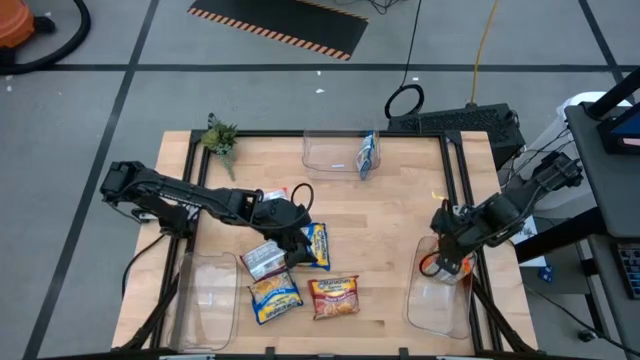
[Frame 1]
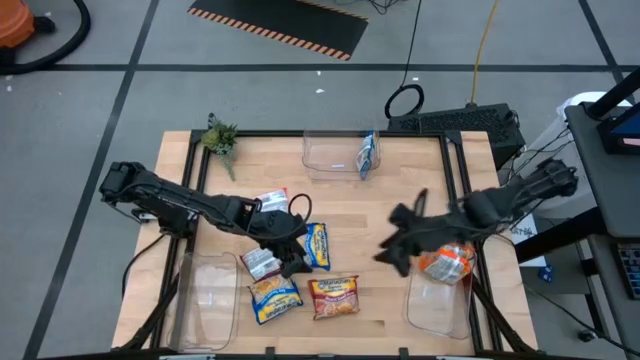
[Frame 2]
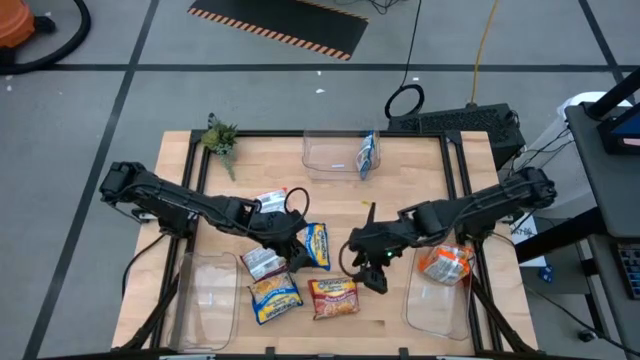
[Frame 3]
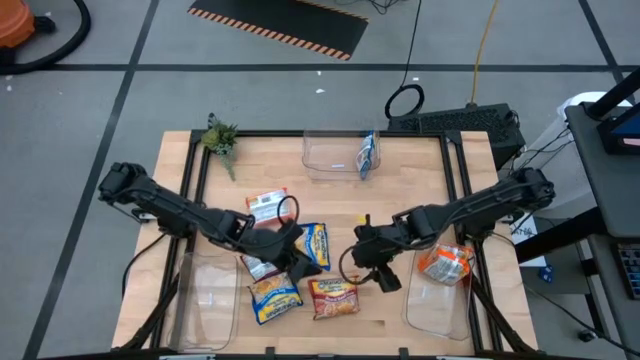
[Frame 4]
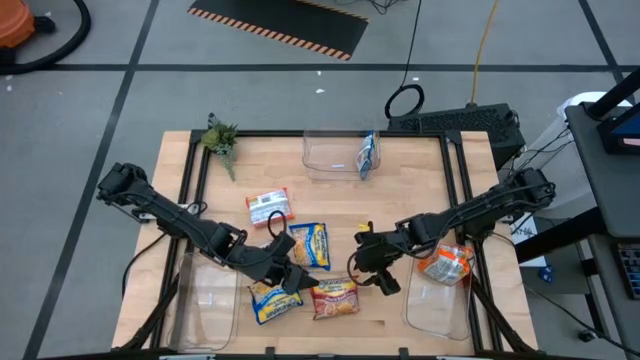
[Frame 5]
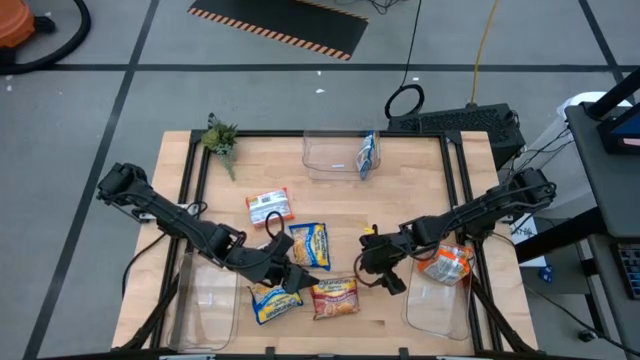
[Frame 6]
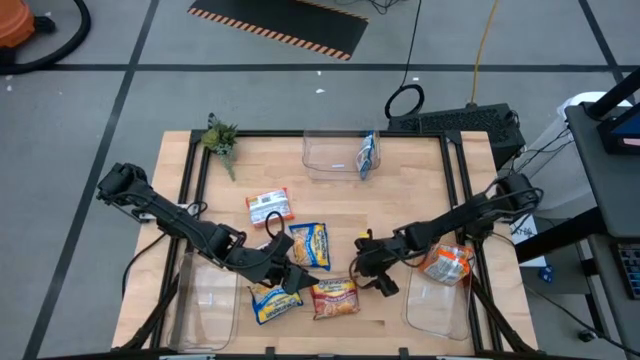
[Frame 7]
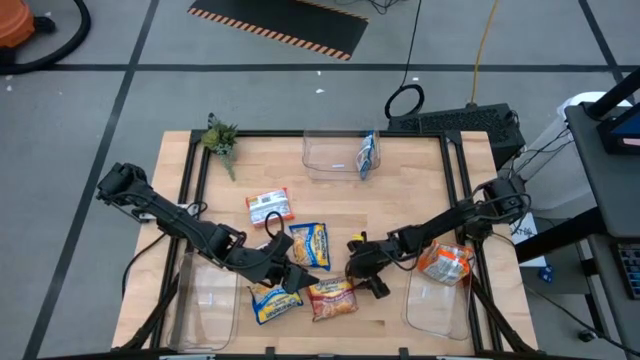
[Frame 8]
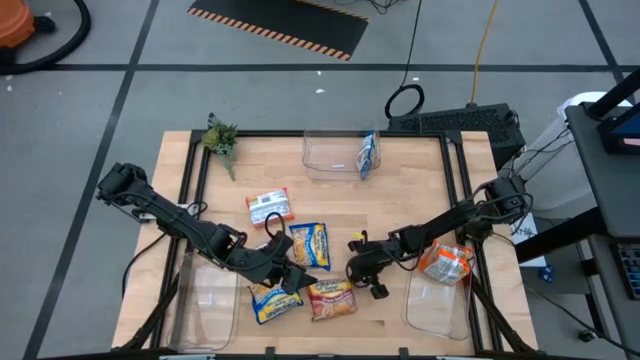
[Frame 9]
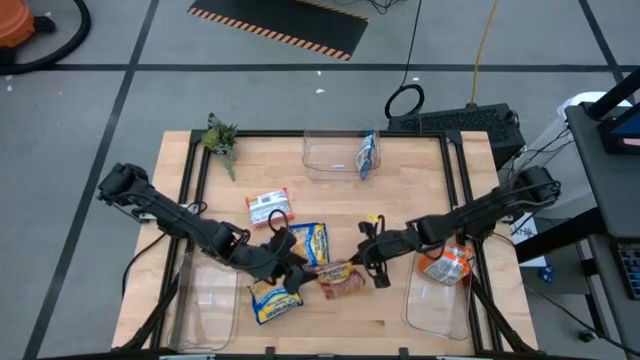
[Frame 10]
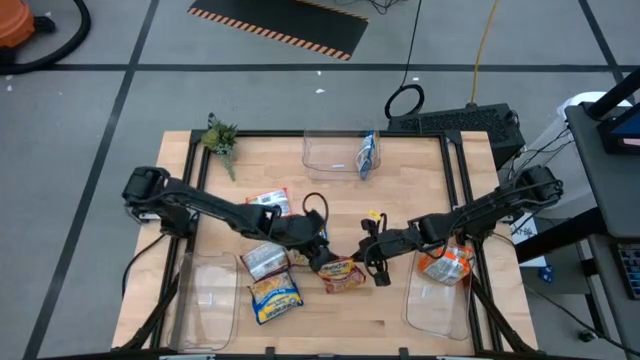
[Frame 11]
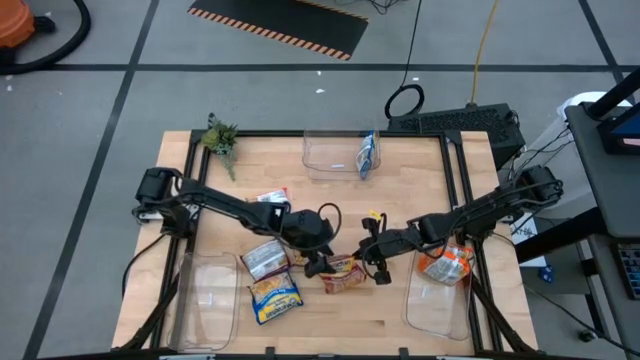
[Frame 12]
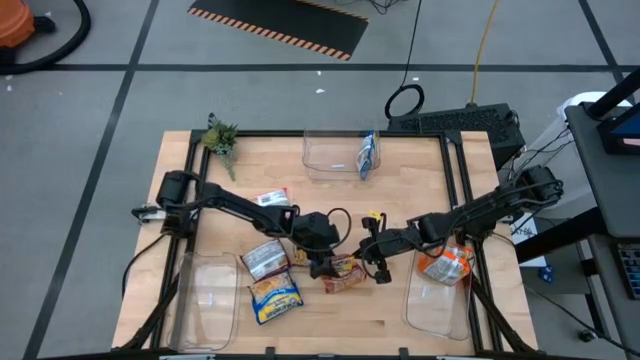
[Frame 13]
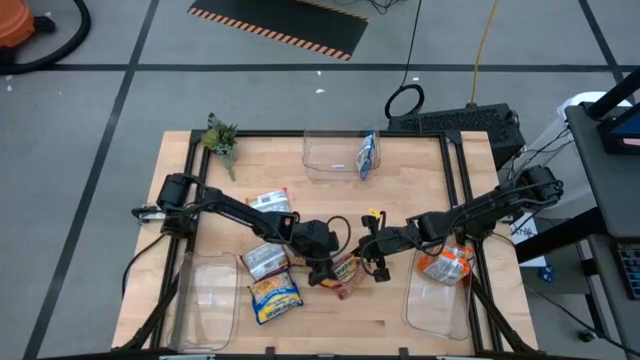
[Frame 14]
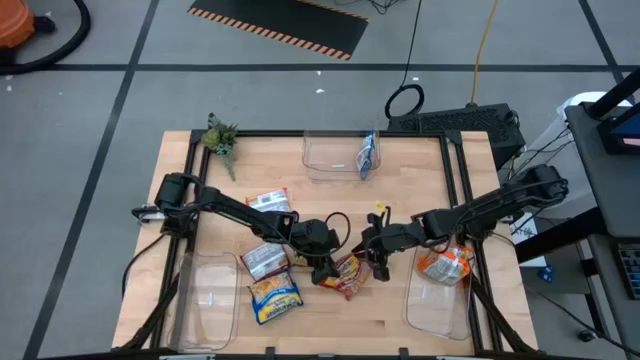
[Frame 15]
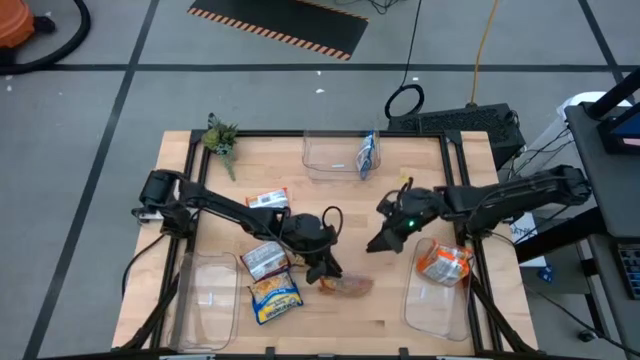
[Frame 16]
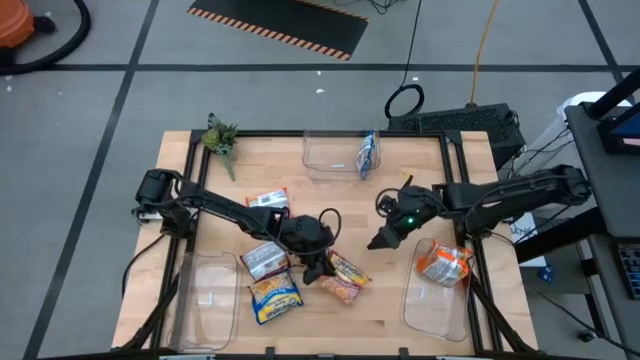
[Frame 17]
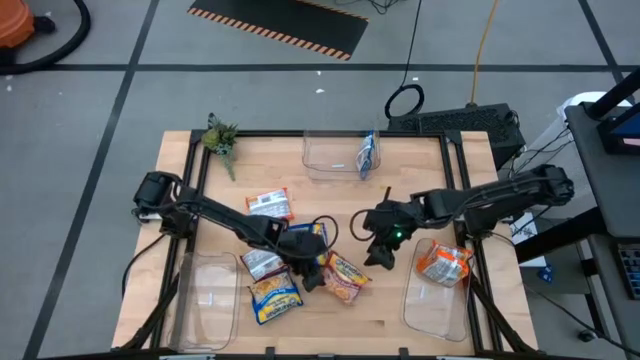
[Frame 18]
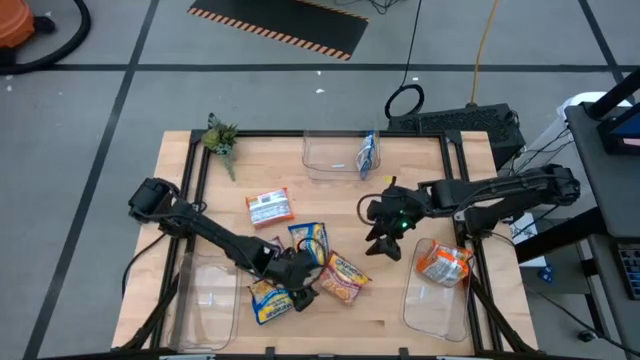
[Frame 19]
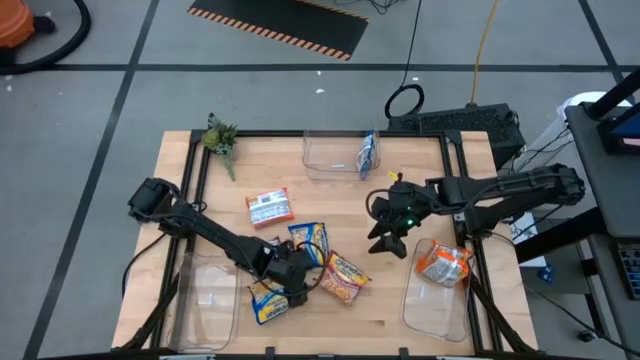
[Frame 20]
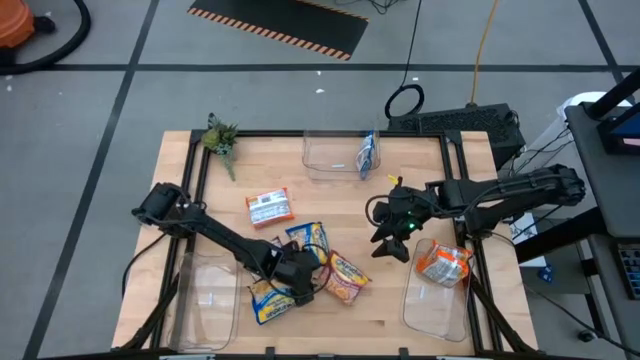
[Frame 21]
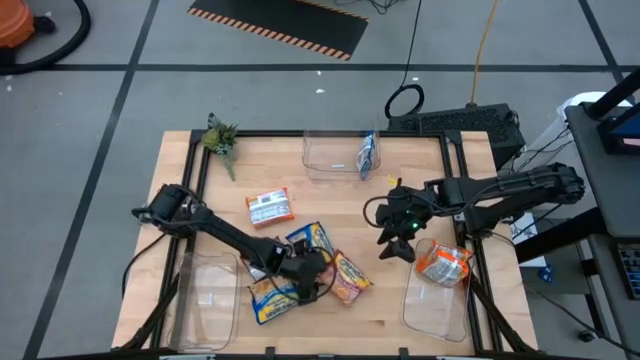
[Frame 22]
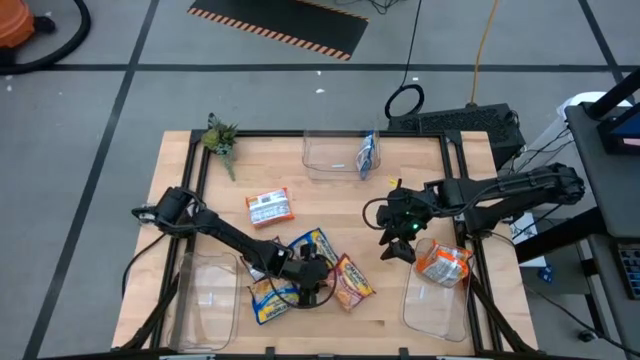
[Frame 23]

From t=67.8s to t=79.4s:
Task: Sort Maruchan noodles
Put the right red noodle pack into the bottom left transparent bin

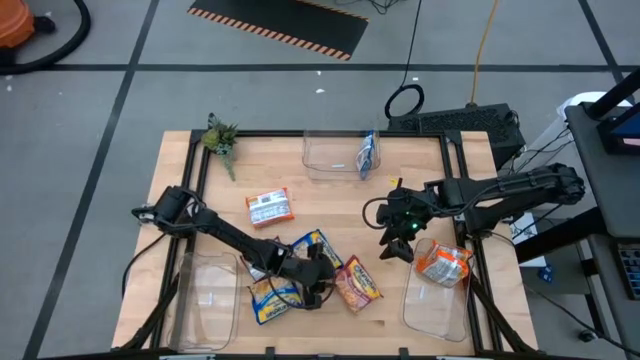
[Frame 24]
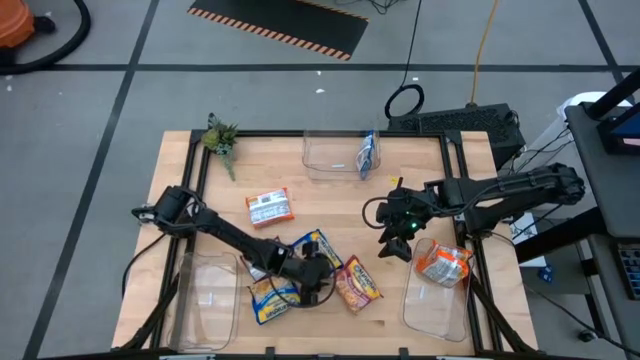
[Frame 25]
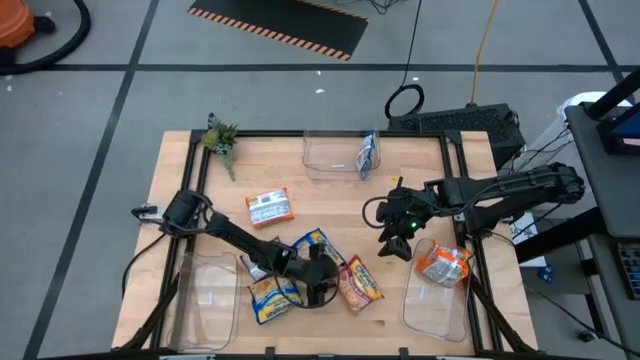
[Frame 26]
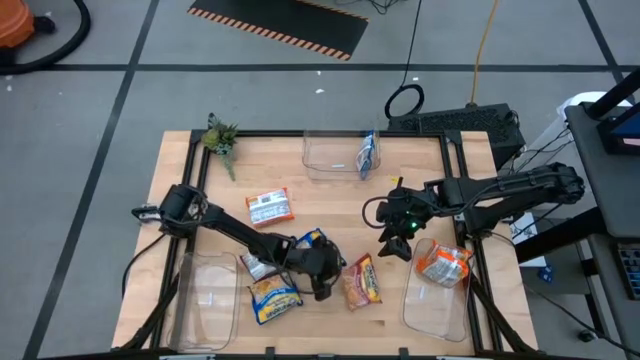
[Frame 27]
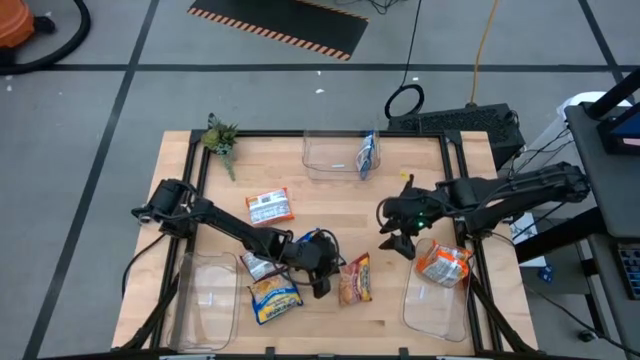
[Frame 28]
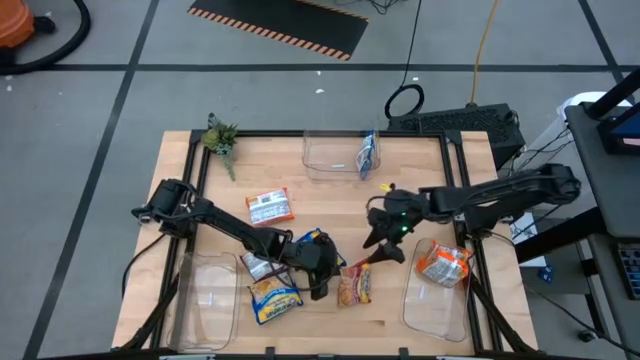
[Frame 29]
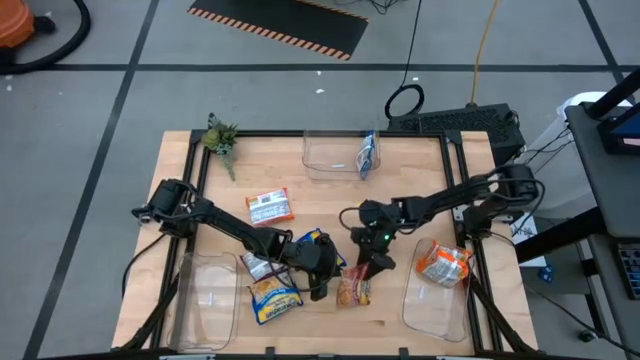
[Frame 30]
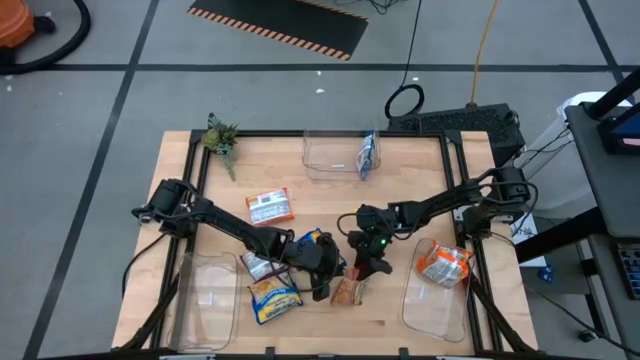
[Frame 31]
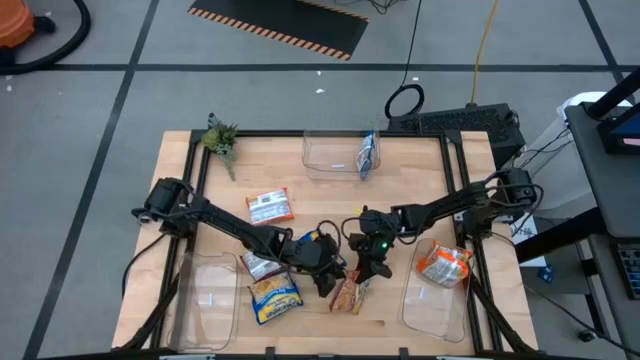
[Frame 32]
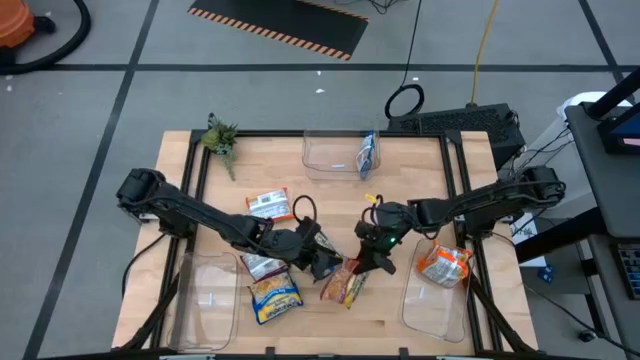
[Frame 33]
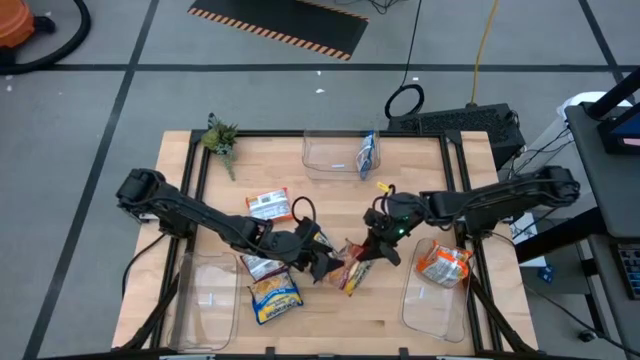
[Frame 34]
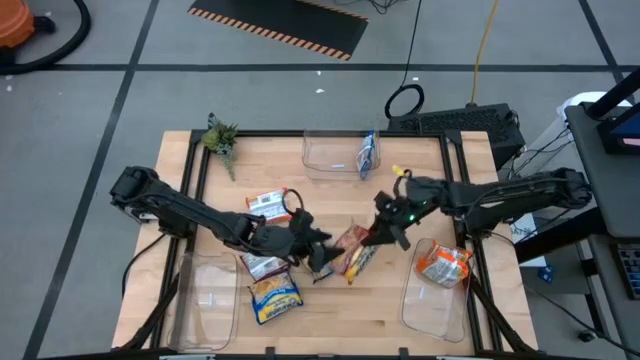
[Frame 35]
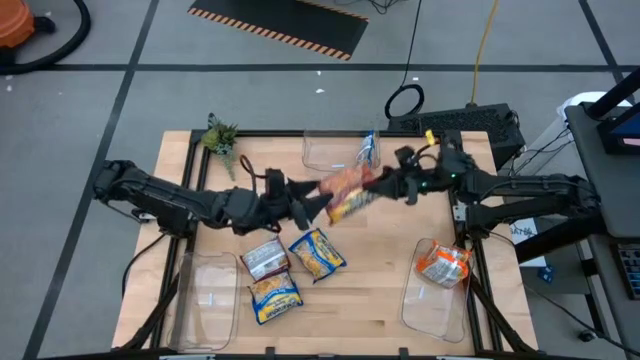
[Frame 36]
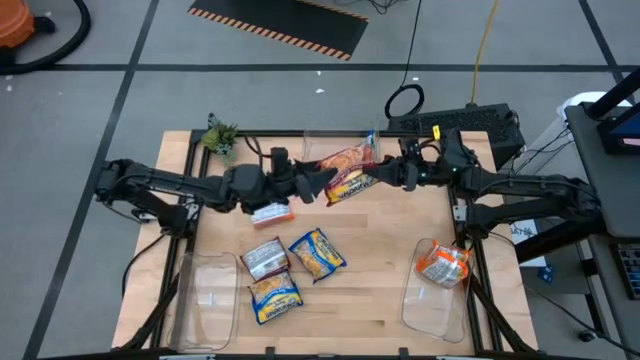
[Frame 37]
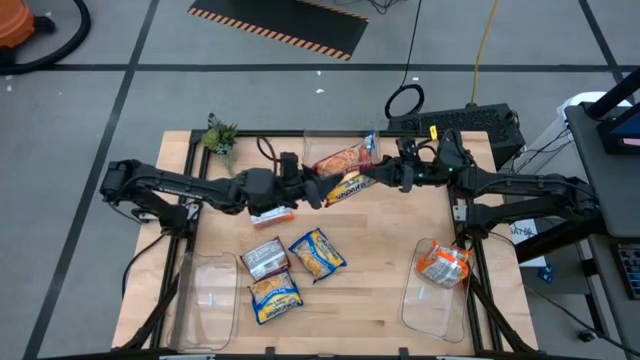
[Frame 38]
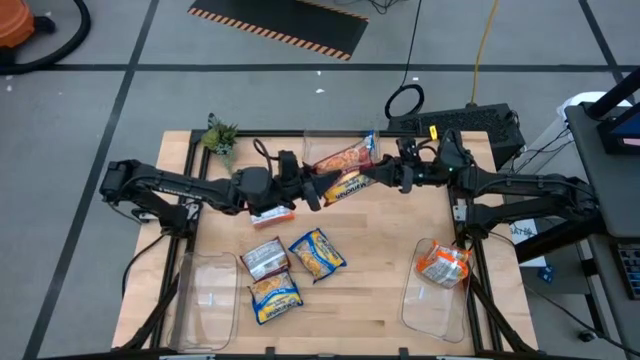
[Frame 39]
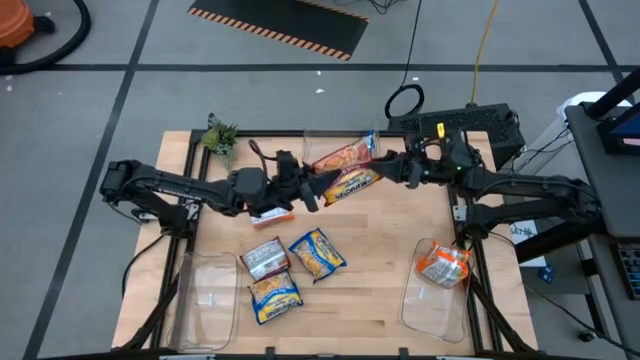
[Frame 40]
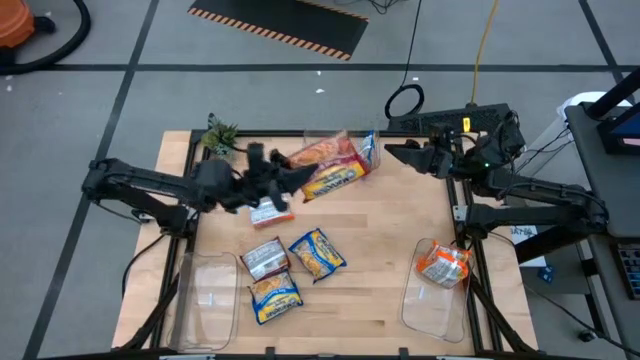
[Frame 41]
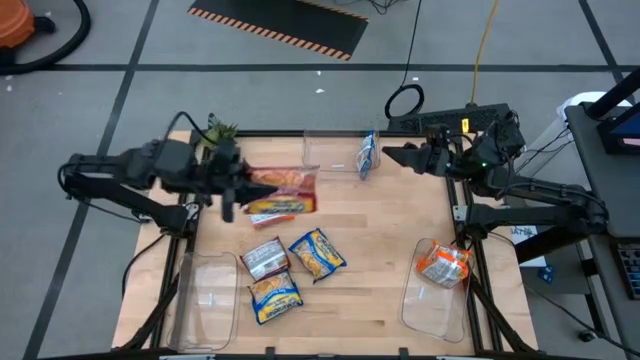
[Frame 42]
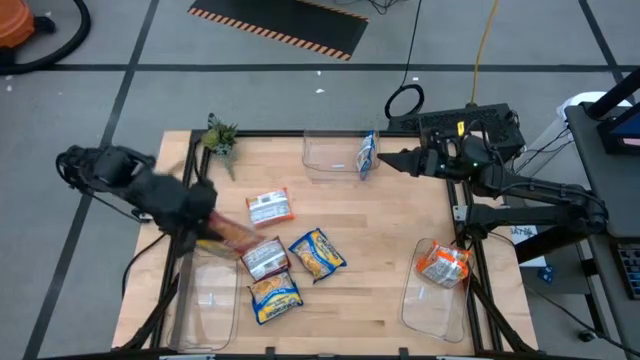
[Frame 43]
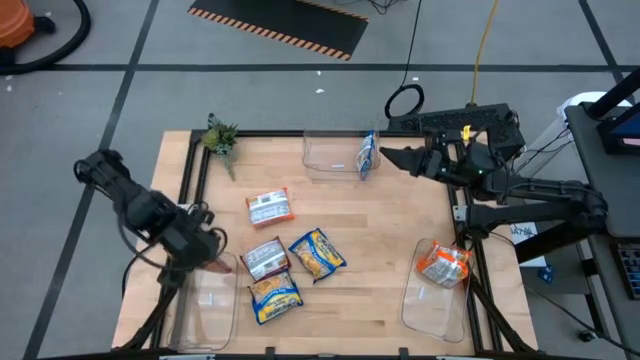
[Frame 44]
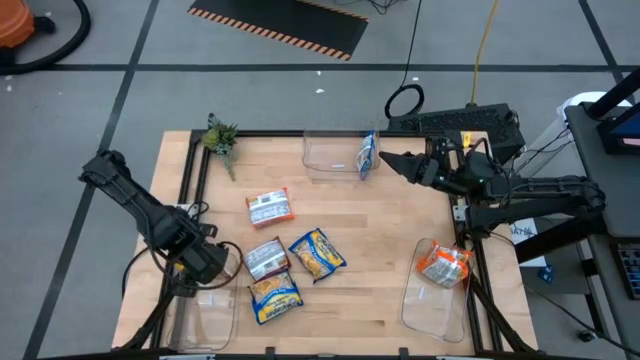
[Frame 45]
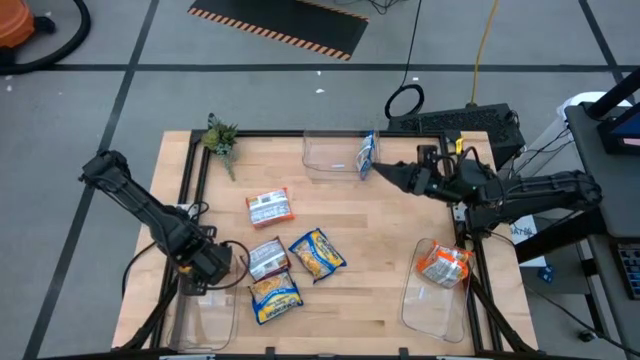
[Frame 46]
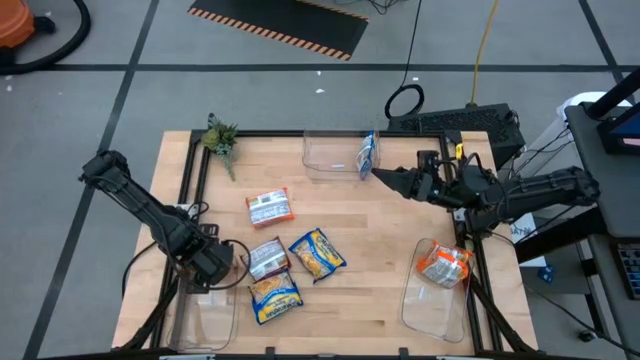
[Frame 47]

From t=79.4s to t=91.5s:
Put the right red noodle pack into the bottom left transparent bin
